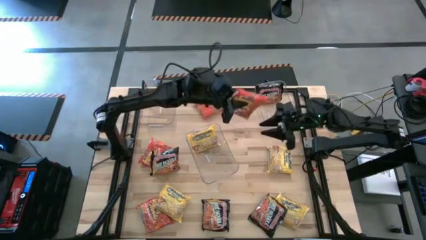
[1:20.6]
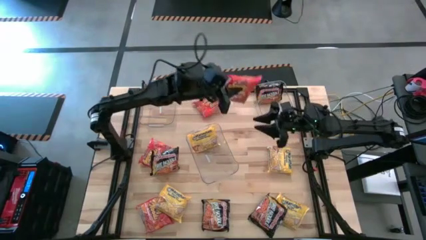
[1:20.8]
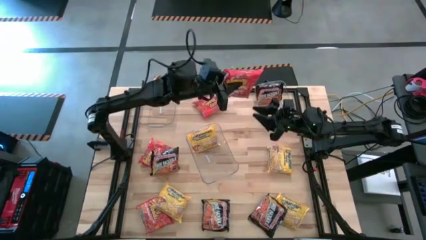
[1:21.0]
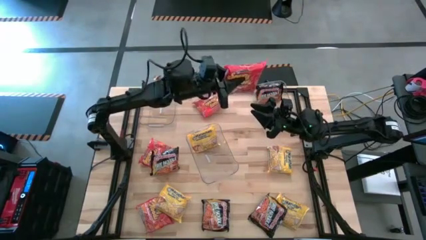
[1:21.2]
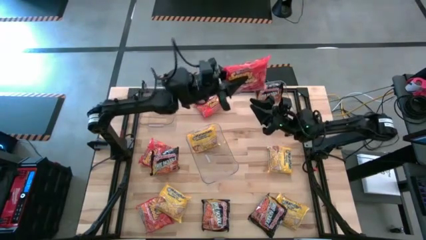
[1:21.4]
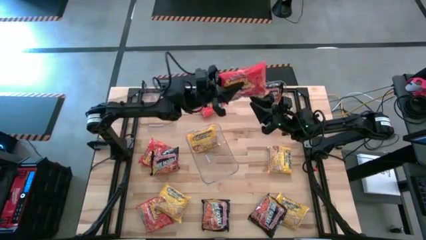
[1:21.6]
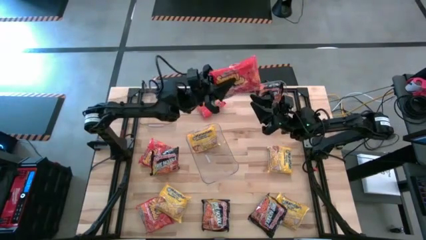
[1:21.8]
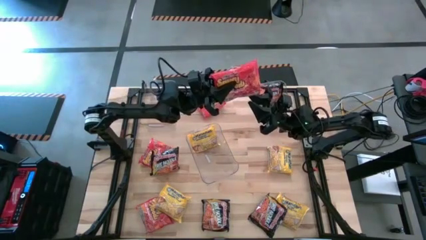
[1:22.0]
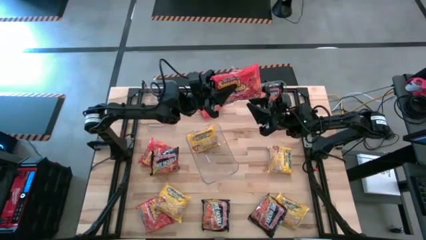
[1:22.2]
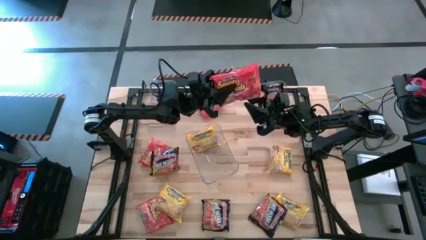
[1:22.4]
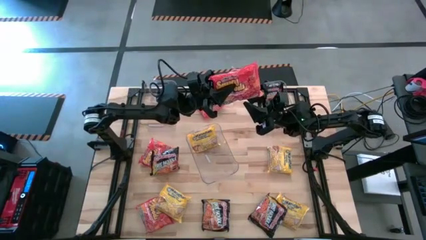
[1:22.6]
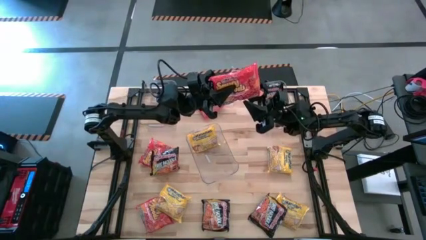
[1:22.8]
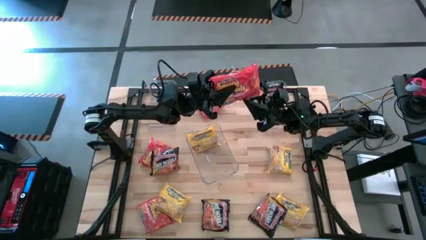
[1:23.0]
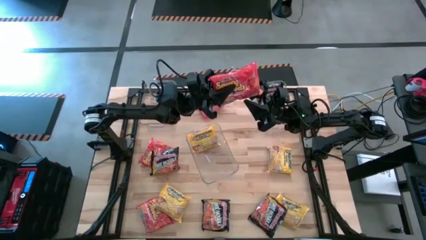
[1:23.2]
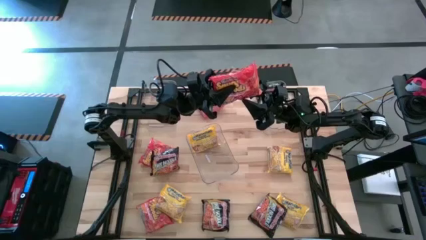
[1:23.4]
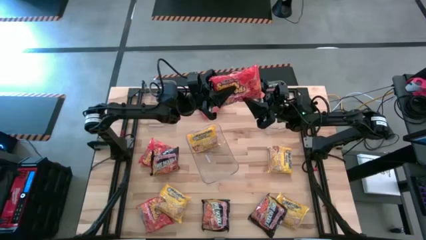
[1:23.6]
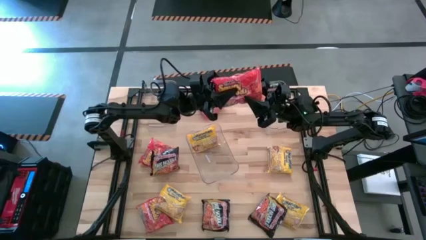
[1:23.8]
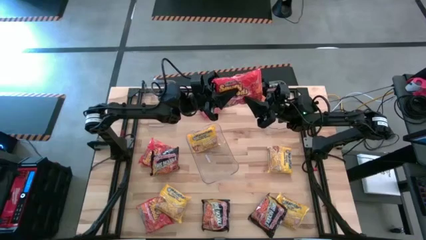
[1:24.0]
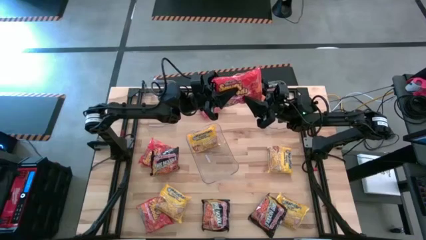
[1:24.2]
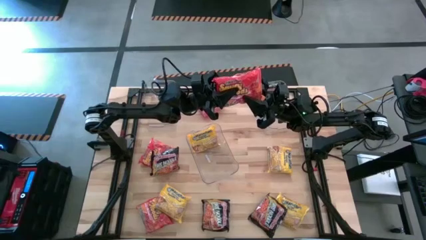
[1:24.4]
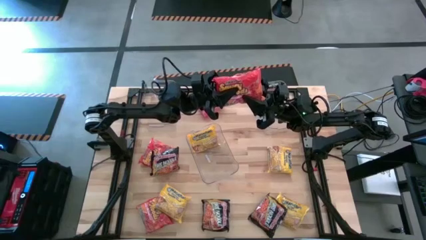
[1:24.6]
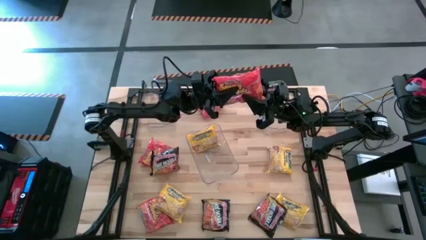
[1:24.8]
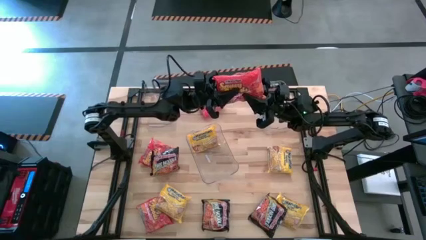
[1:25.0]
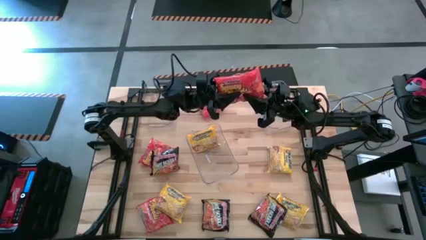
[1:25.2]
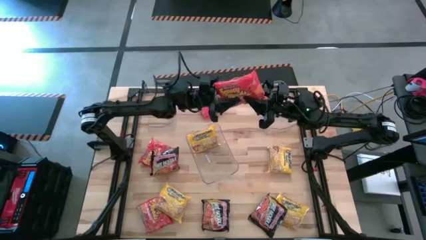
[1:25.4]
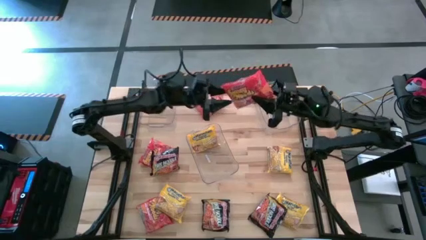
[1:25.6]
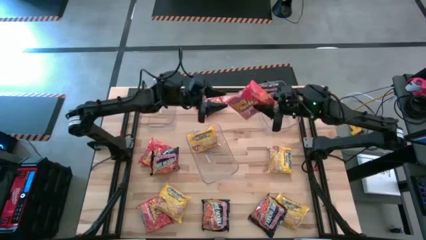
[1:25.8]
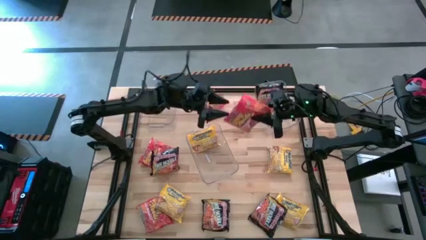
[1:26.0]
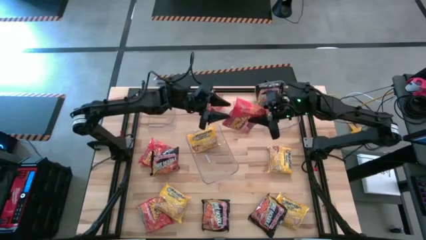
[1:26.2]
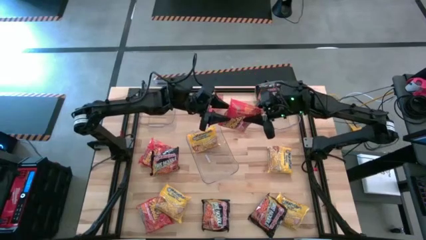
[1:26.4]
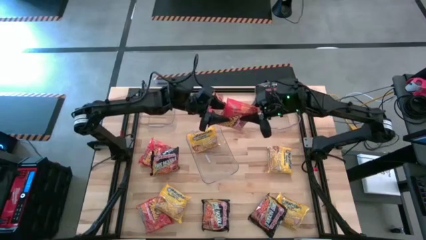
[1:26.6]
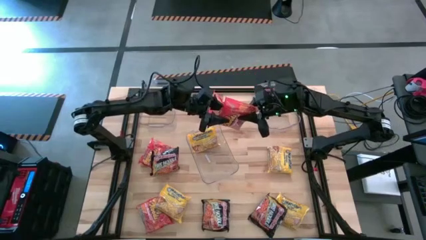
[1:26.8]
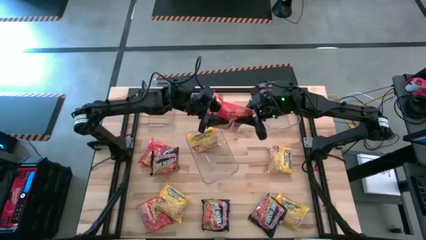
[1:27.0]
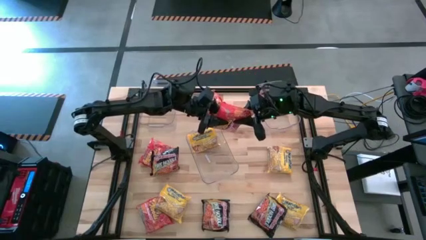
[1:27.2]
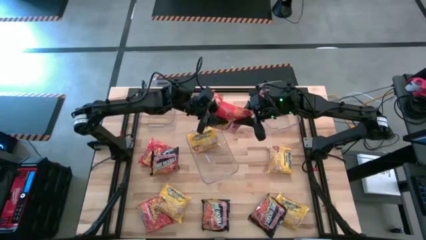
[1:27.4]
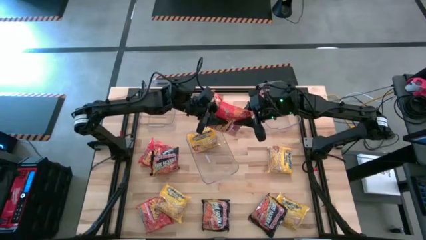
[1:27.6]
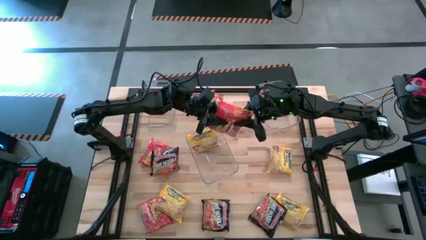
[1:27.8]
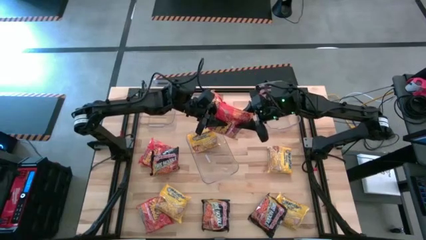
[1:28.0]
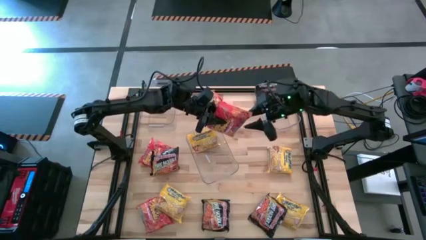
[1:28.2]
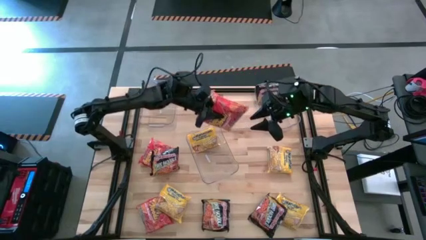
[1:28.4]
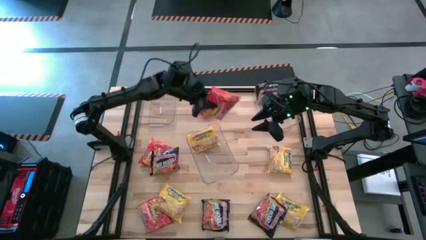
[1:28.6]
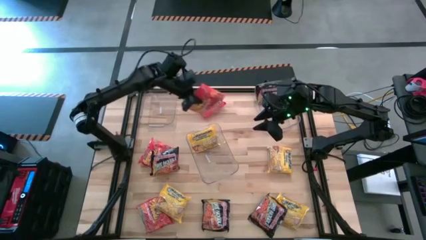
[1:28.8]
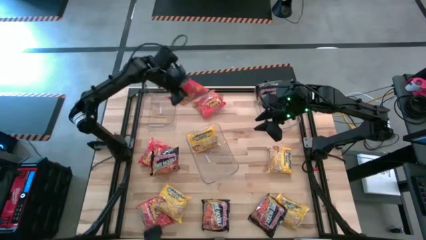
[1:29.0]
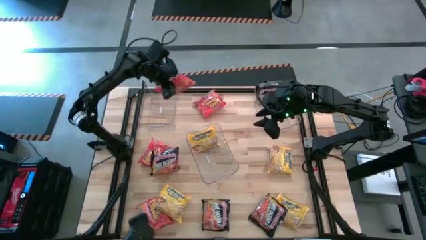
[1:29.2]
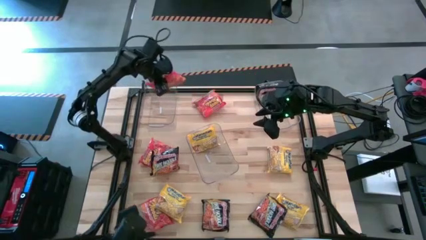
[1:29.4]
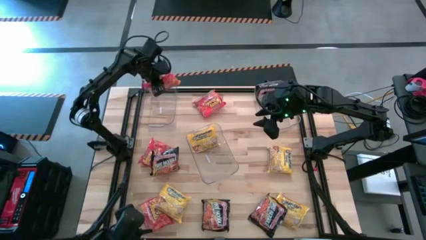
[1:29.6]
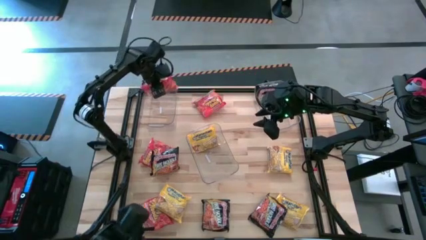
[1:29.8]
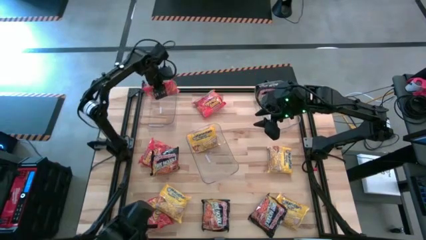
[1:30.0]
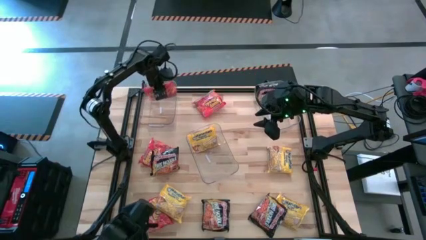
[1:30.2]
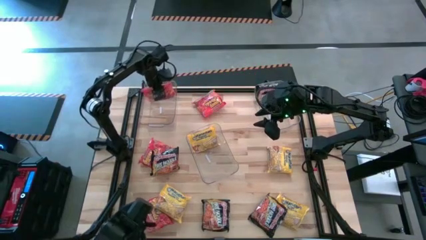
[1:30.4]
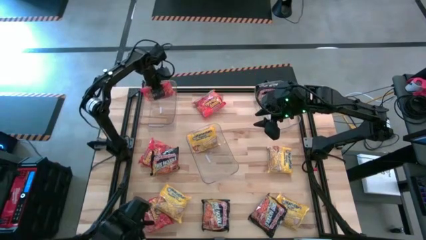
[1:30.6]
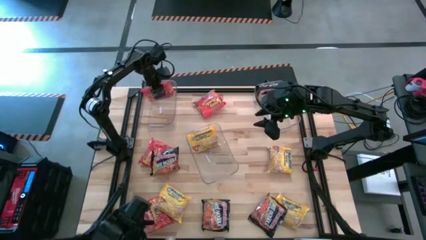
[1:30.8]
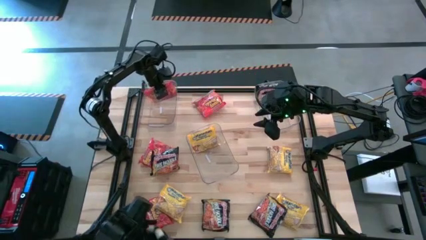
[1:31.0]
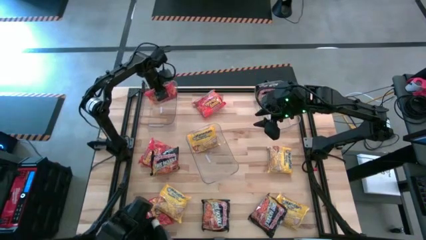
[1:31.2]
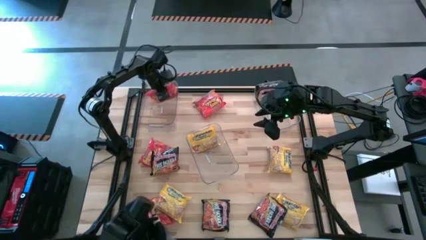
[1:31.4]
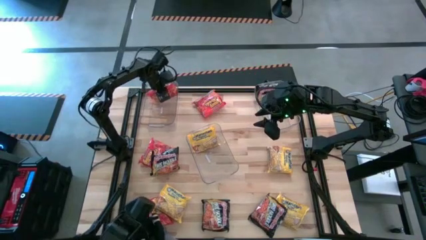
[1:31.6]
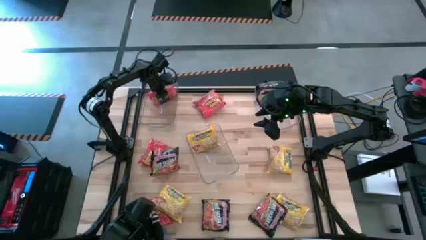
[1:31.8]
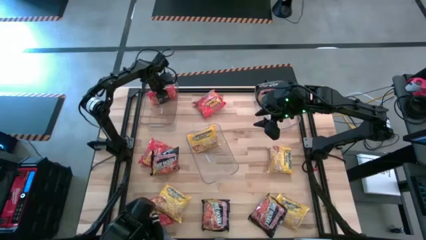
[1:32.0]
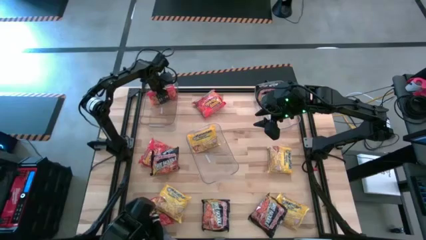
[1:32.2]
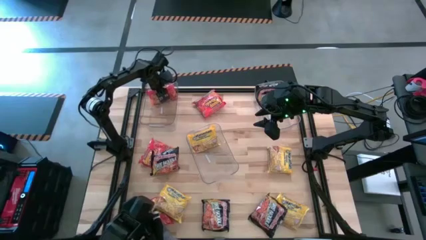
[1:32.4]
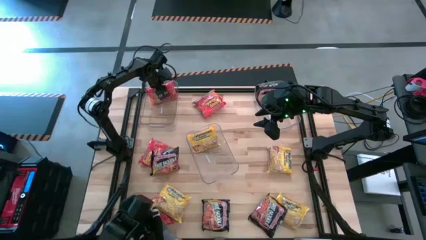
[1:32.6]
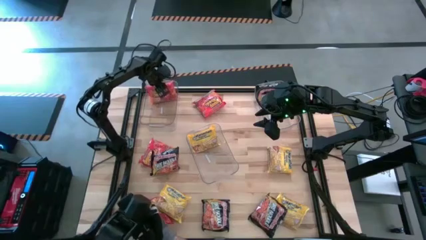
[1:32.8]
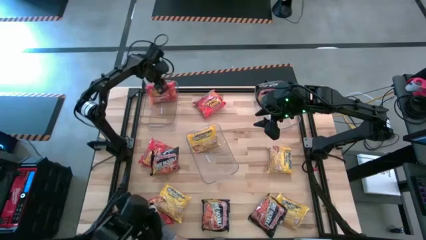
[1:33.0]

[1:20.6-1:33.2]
Task: Sort Maruchan noodles
Put the orange noodle pack into the top left transparent bin

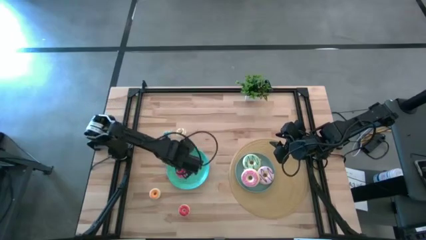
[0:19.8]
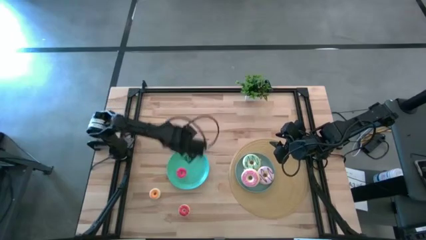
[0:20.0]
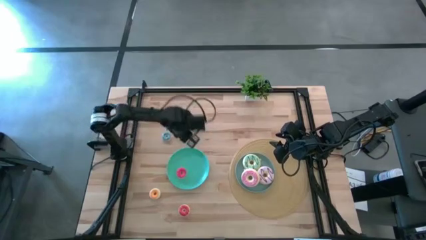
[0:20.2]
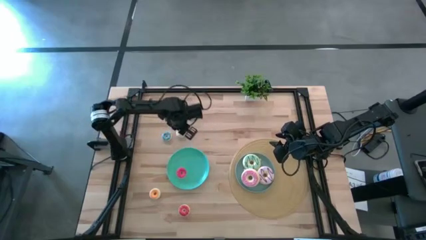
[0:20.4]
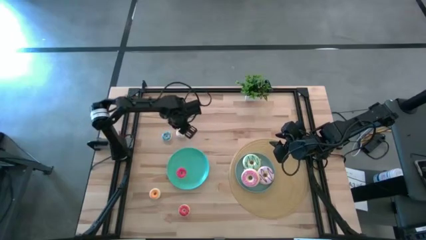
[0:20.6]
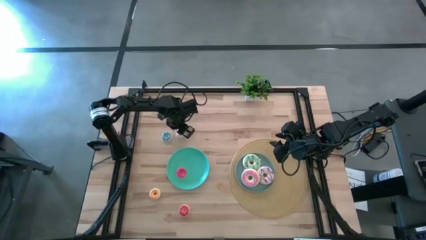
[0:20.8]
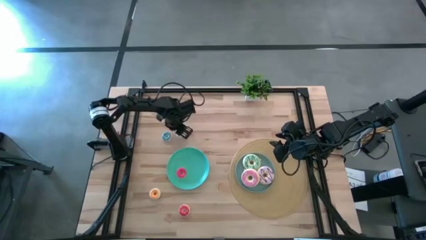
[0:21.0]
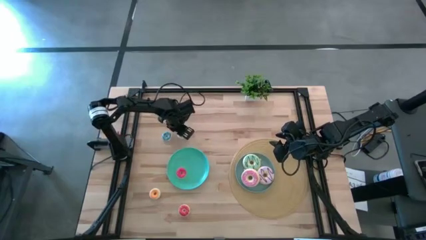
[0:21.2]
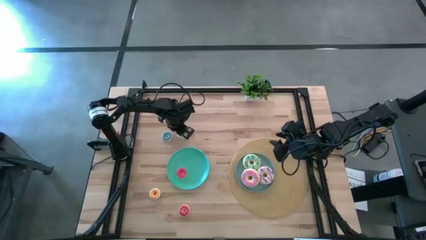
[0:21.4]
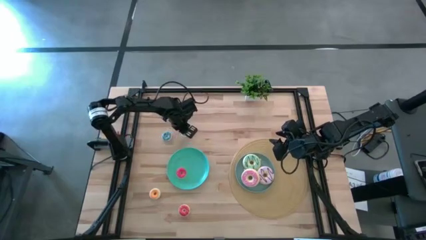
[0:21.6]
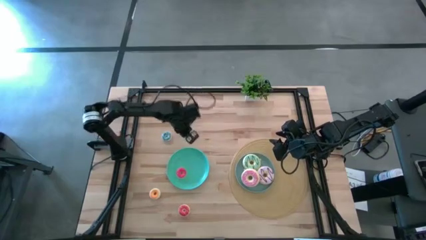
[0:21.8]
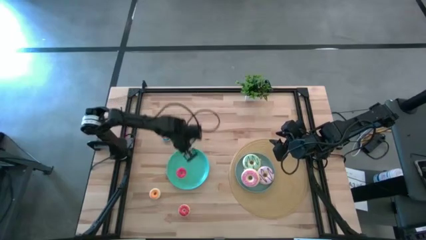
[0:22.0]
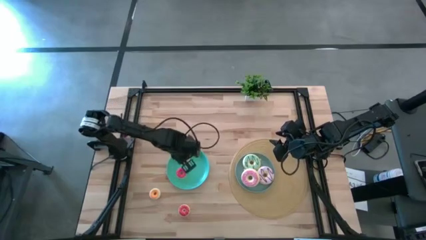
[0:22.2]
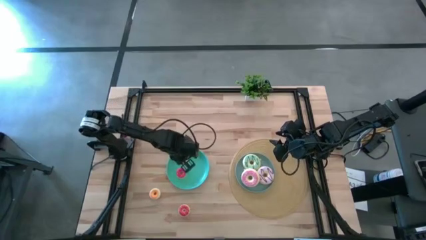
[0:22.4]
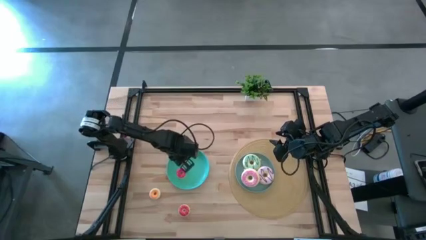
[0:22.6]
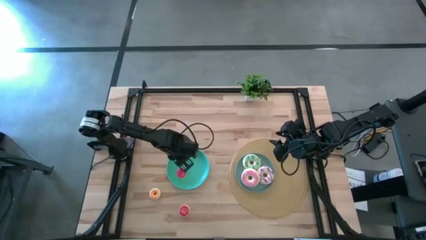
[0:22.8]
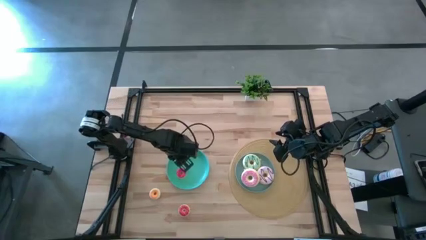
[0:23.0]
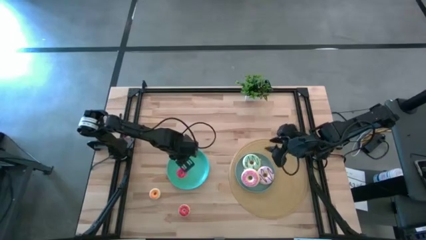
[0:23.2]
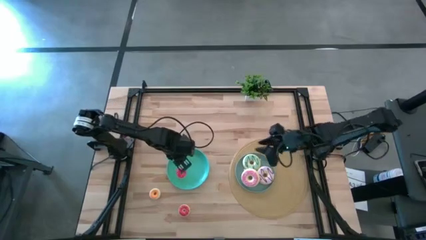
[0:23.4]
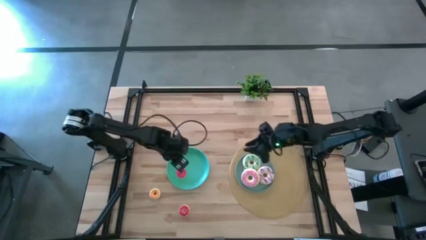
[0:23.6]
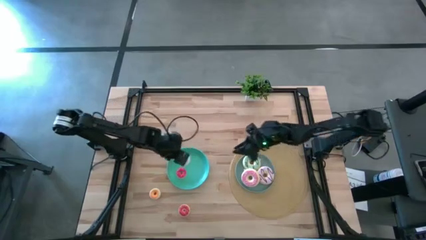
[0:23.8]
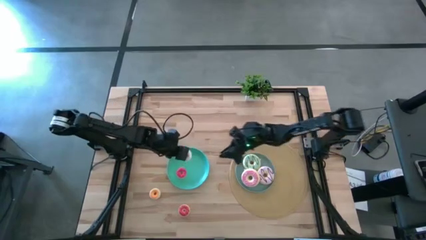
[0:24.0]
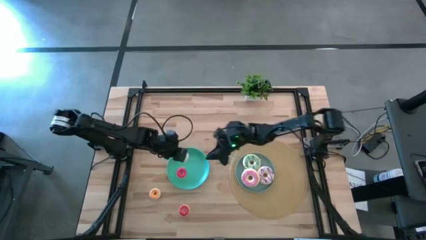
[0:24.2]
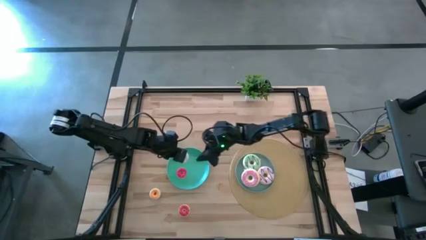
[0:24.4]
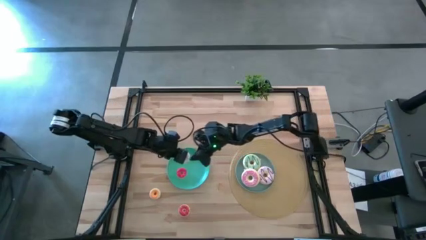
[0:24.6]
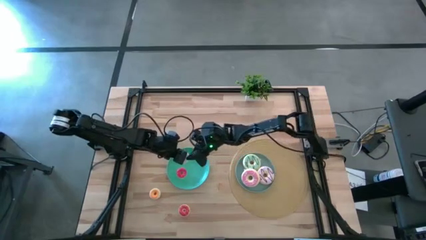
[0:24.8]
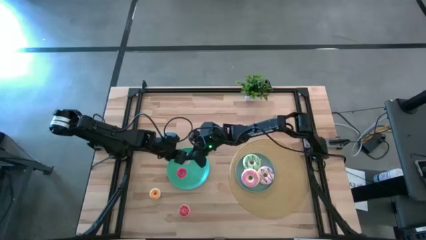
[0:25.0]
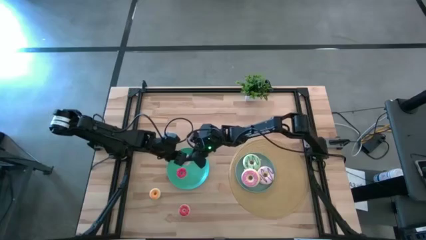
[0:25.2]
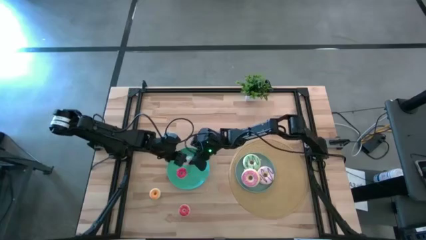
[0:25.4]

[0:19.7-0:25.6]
Task: Pick & Place donuts
Put the small white donut on the green plate
